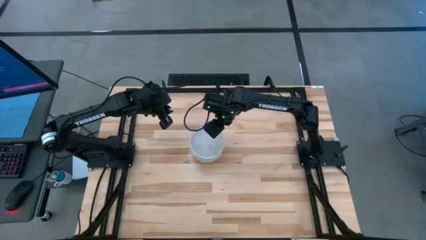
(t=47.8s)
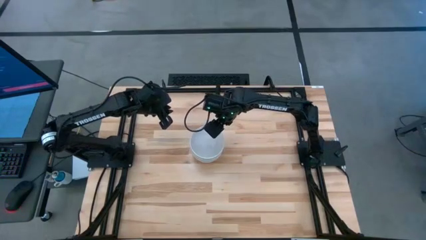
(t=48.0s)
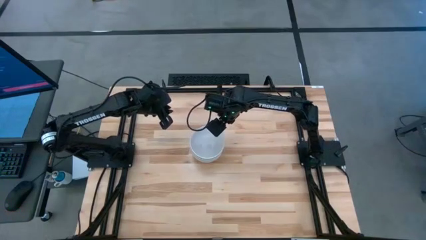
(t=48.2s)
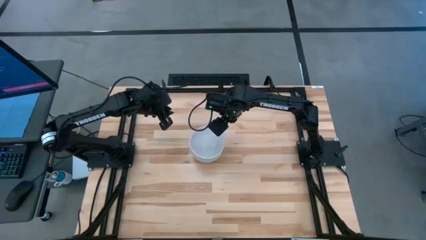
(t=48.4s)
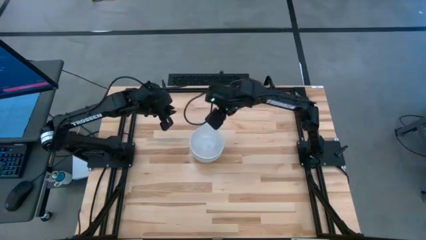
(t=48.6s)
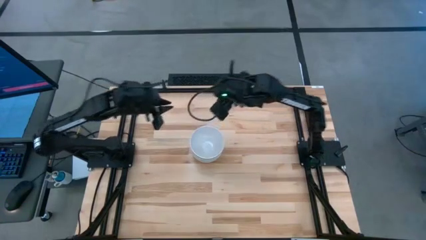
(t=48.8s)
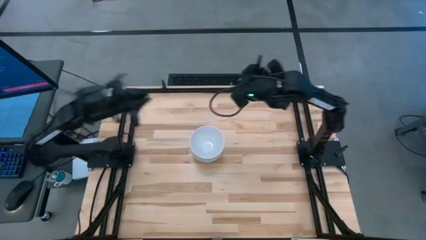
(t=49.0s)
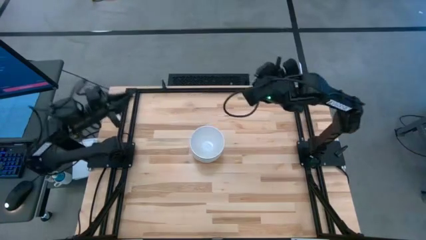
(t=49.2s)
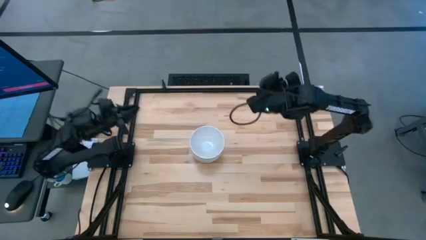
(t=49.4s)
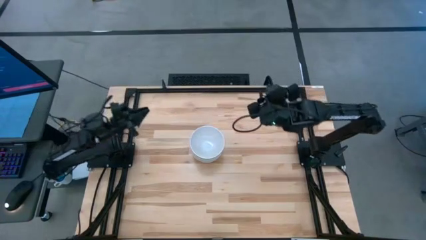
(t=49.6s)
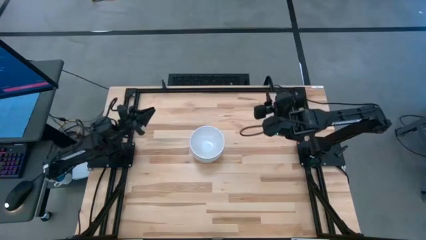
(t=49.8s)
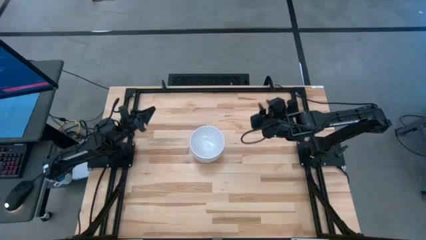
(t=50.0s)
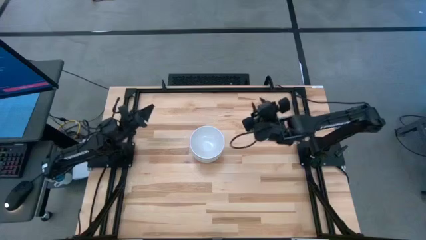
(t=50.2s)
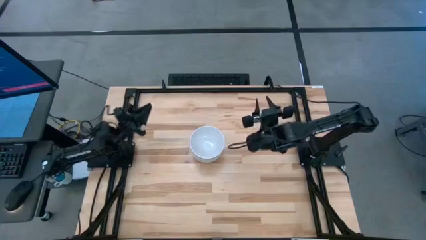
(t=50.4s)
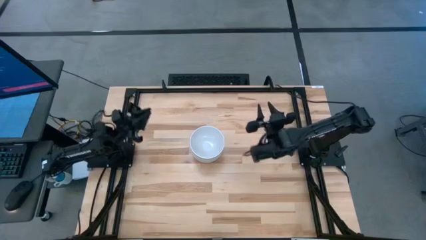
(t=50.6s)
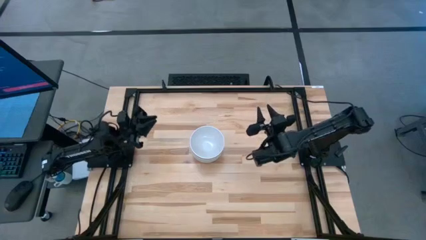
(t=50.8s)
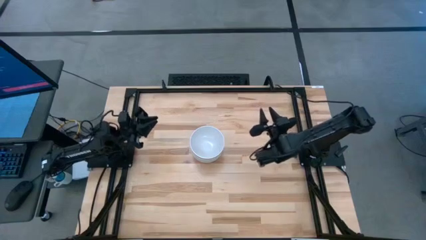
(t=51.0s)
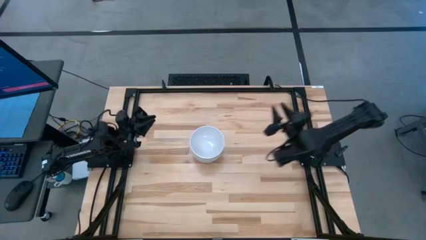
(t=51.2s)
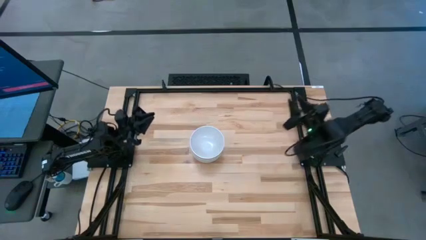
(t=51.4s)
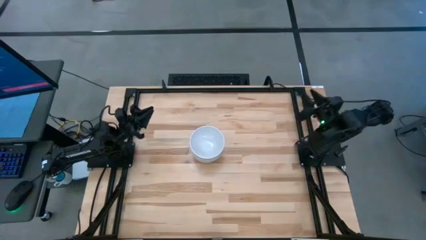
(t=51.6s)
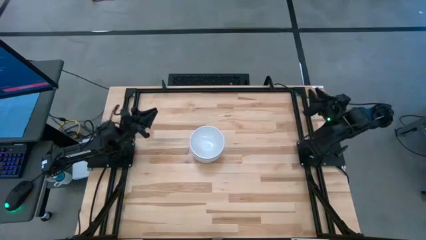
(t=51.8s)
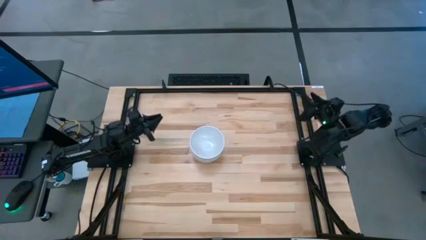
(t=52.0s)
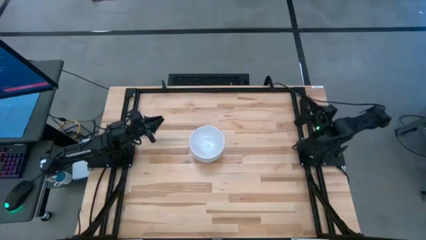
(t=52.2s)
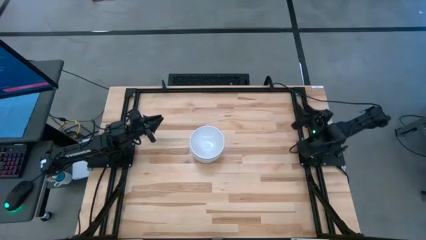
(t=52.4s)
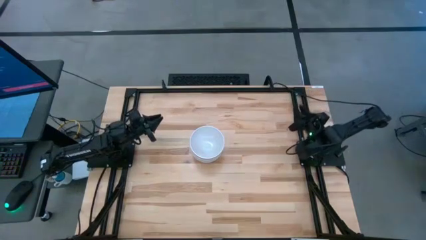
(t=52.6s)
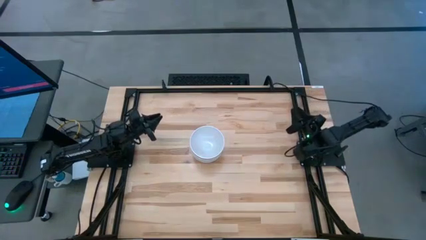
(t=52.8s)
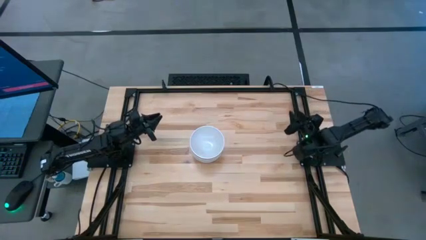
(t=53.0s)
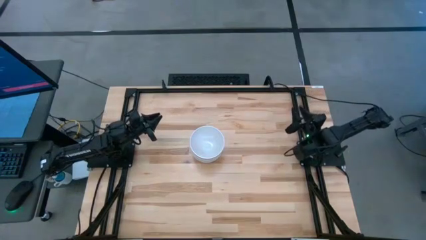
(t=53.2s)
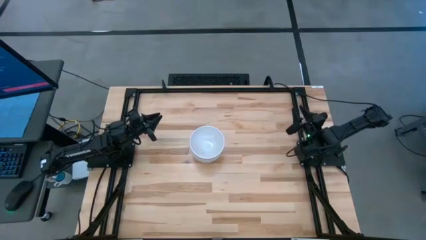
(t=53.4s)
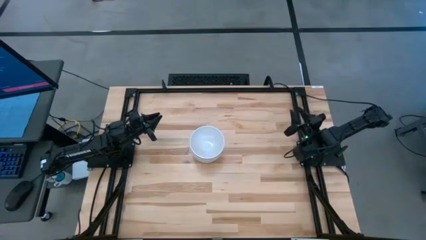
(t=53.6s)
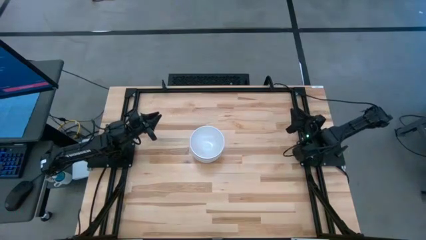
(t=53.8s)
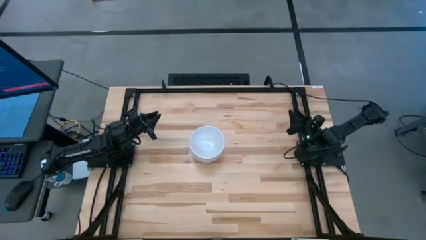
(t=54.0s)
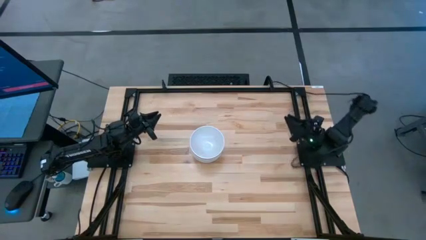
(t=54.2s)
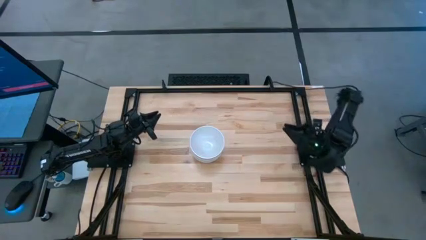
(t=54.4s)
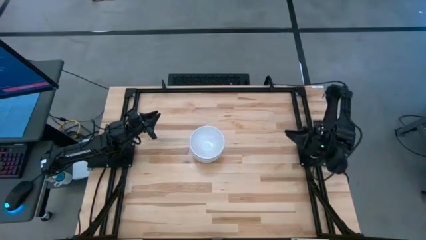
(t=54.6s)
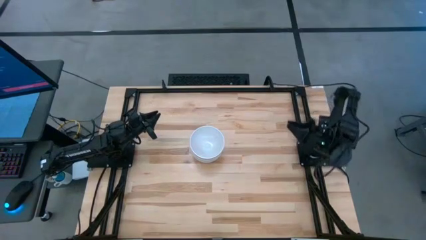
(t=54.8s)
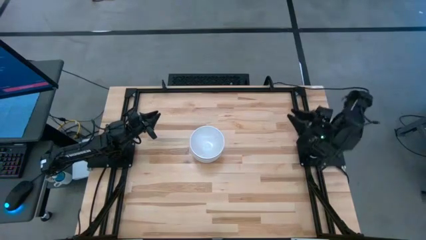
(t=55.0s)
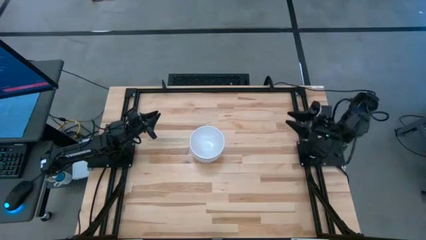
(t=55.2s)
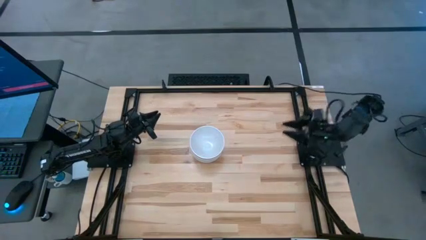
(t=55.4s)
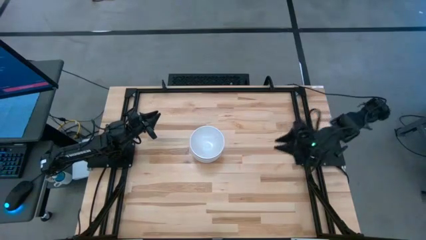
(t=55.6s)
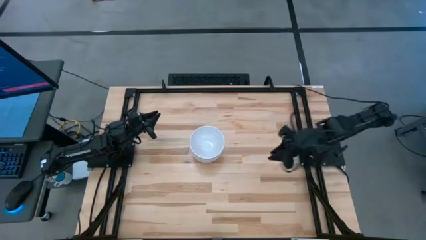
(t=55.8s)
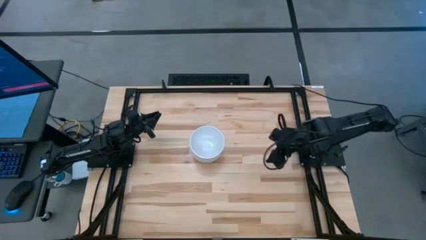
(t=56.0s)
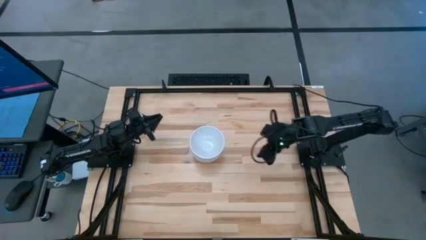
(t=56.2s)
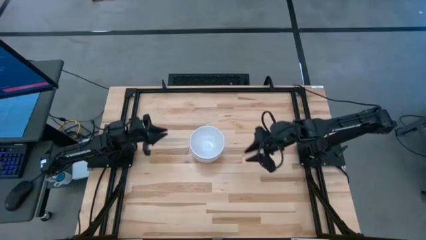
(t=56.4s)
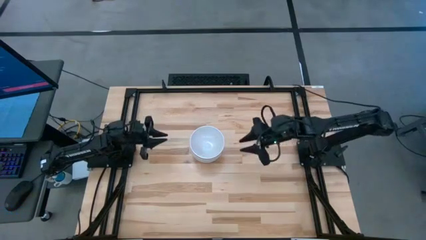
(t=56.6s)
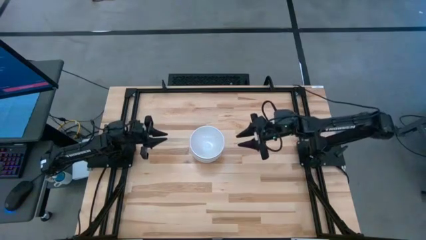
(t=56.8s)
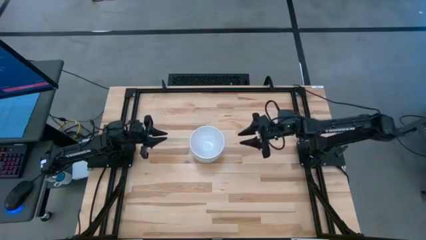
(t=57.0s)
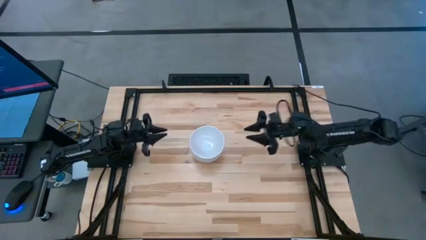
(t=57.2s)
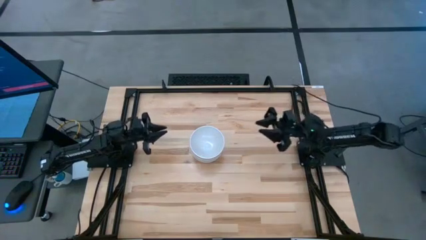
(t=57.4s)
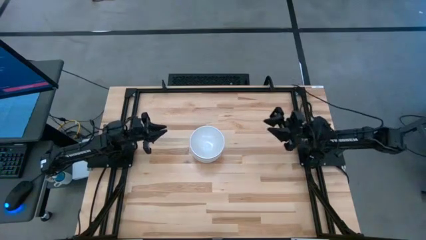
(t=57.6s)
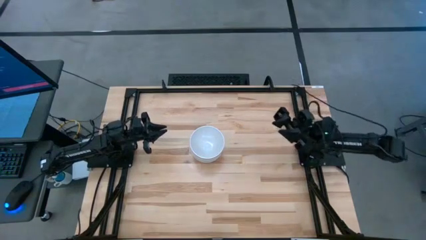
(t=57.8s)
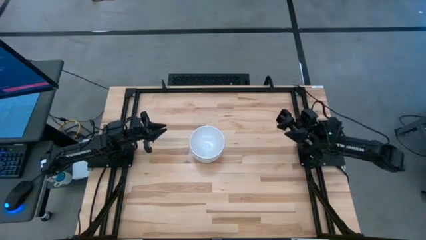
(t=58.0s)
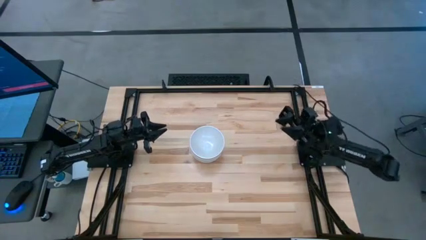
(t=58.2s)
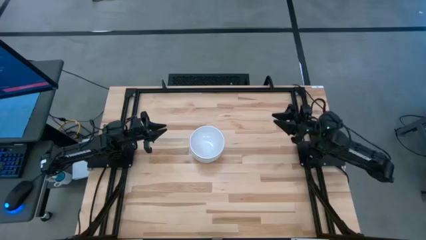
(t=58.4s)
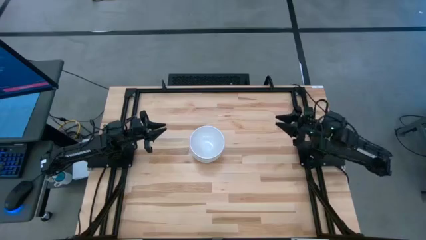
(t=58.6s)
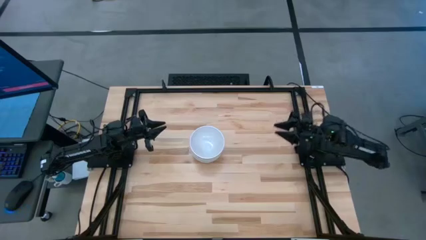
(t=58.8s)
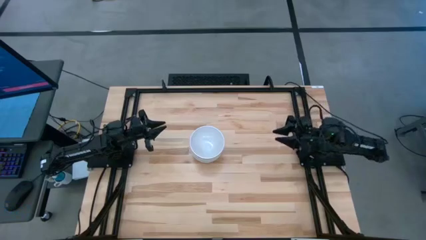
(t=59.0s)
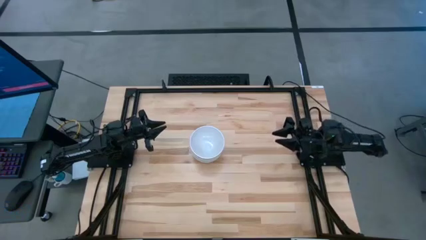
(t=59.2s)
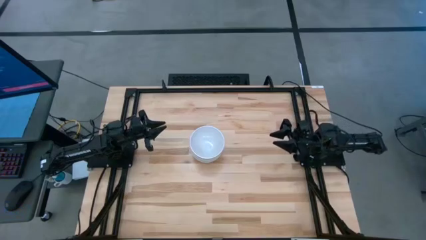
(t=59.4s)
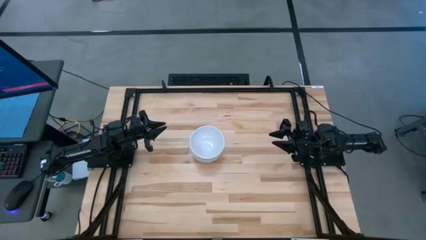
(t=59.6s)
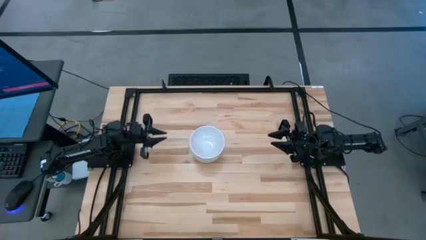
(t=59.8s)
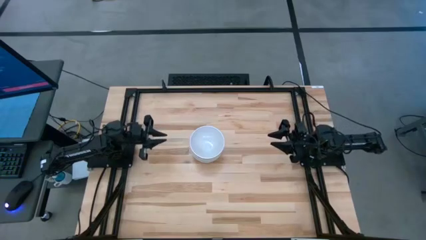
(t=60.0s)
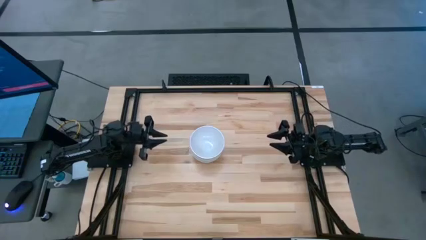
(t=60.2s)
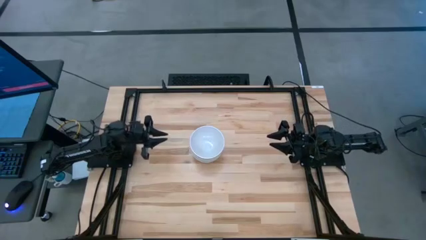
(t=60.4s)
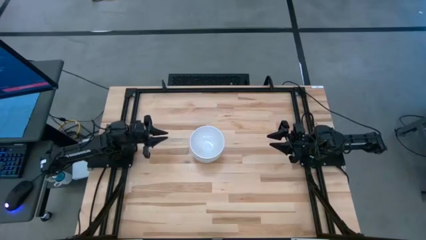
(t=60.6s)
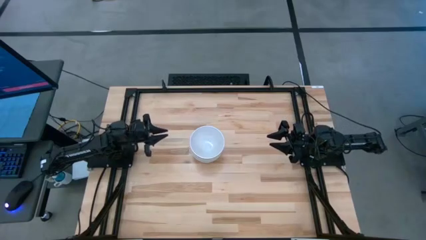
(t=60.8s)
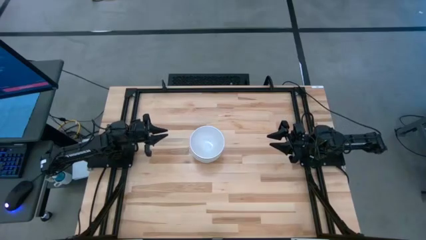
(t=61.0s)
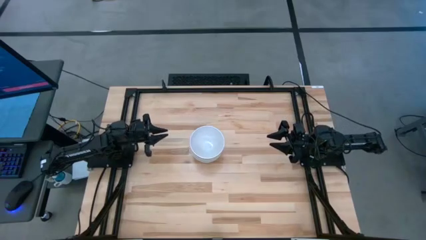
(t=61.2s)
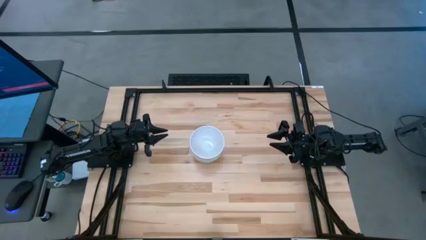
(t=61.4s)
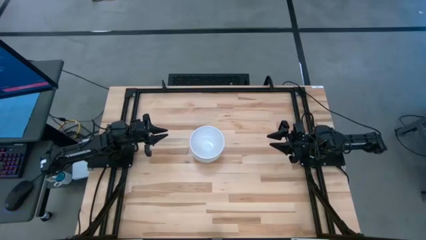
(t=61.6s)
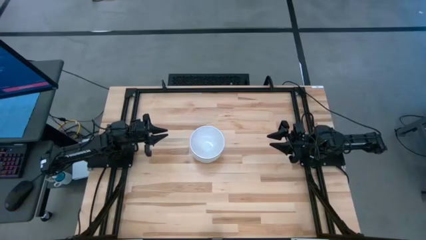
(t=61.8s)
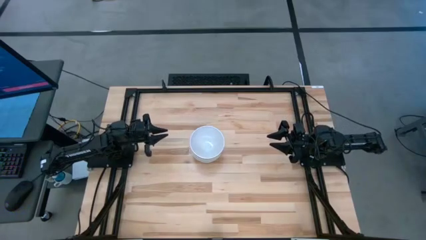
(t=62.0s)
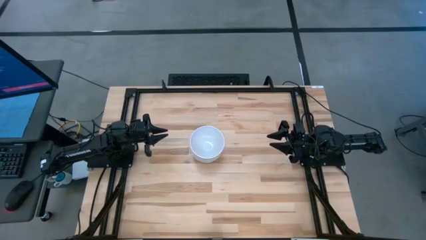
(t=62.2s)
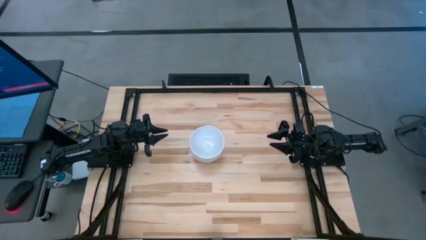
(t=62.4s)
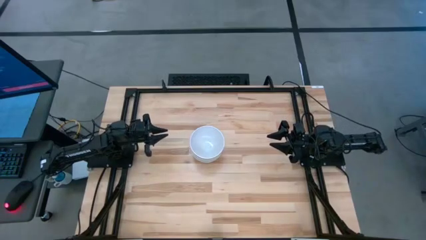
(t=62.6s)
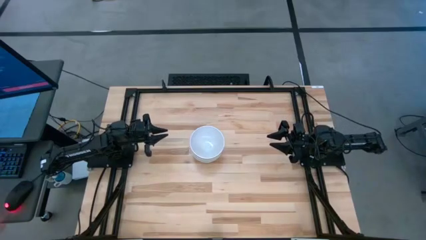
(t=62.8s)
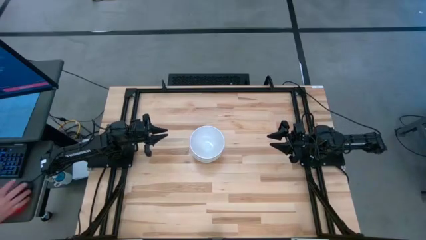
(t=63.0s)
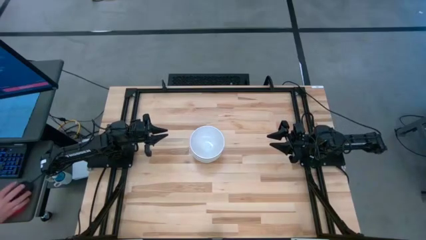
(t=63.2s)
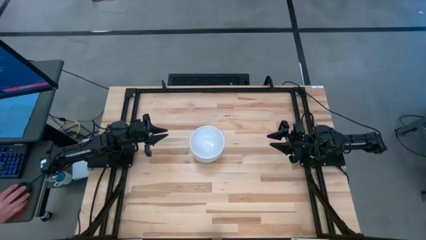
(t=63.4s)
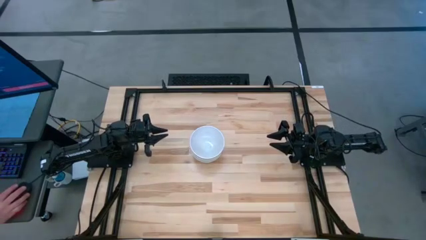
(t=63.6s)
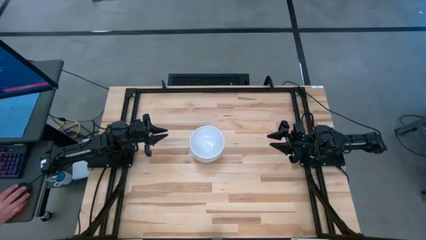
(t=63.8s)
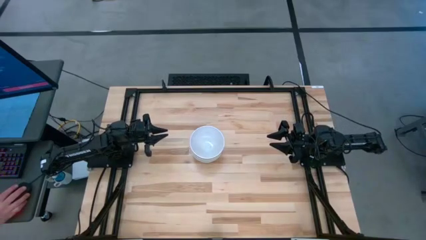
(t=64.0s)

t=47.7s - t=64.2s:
Task: Nest bowls inside each other
Return to Home Position
